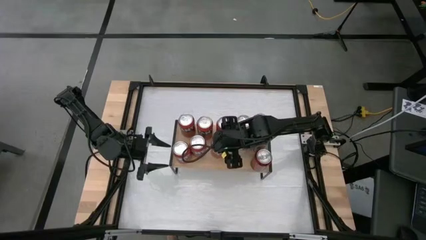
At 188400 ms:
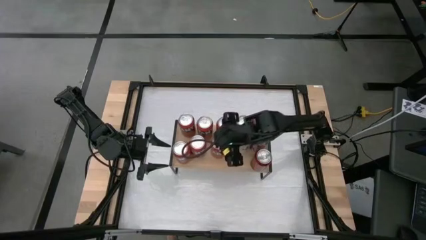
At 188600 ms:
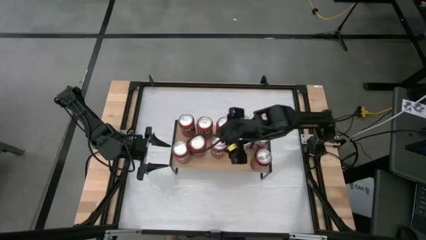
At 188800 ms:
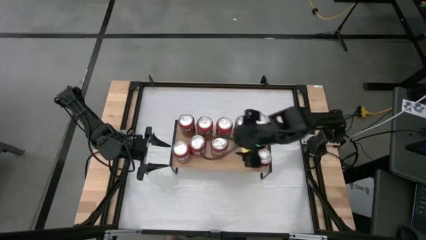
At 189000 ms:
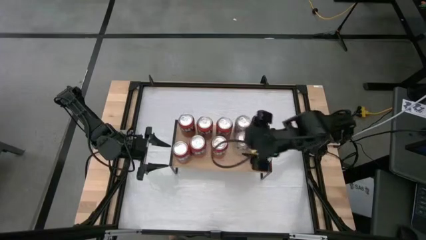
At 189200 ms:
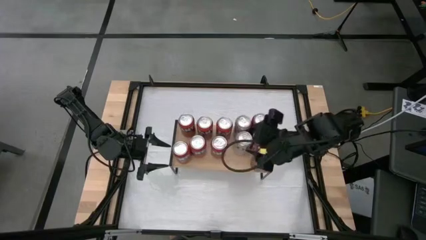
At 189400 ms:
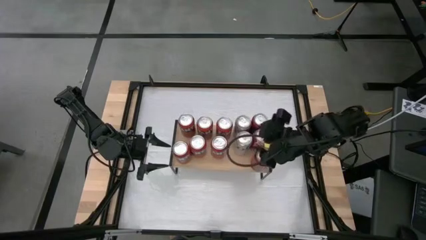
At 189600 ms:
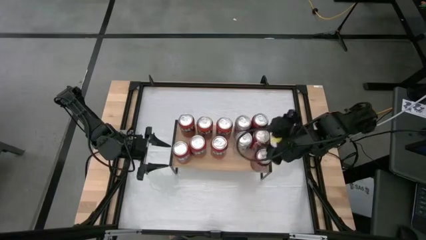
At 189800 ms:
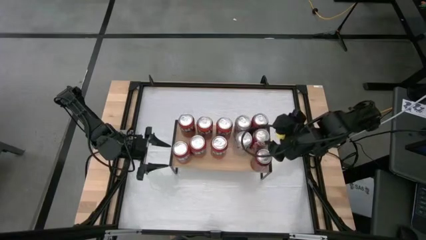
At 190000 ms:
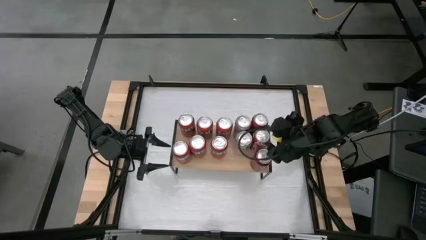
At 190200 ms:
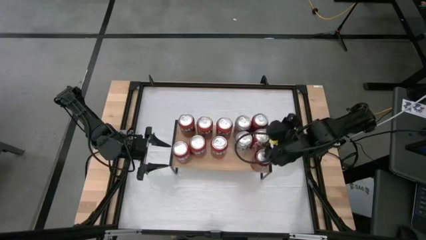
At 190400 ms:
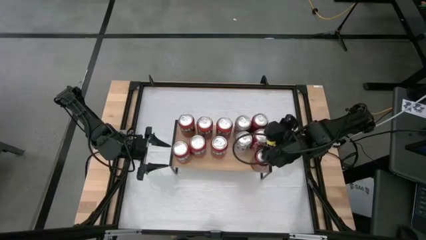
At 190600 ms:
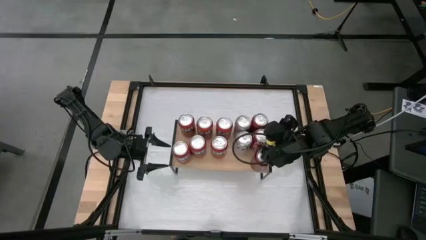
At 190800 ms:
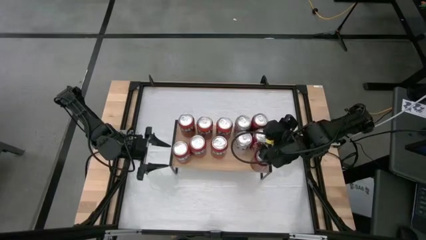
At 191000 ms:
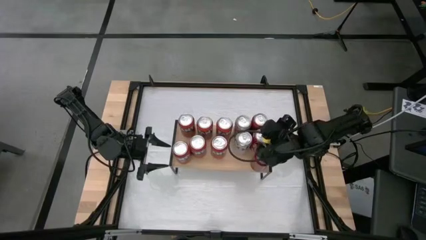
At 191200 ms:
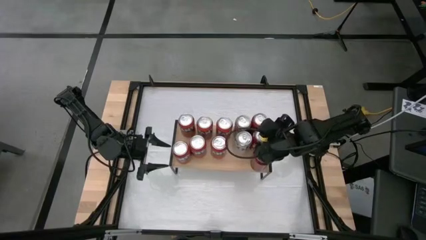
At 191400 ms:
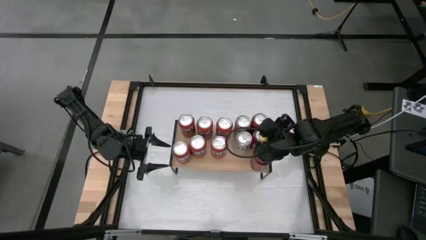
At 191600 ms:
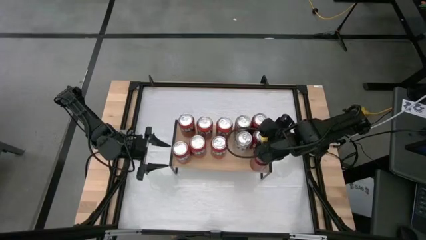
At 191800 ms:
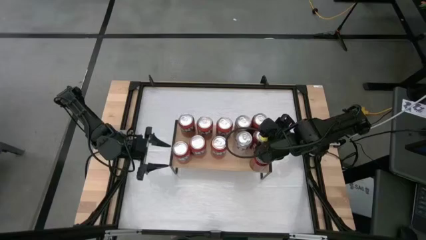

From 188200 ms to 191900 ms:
Task: Place canned beverage on shelf
Adjust the red white soda can on the shelf

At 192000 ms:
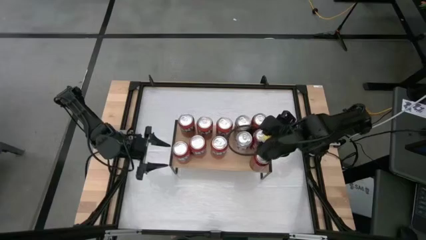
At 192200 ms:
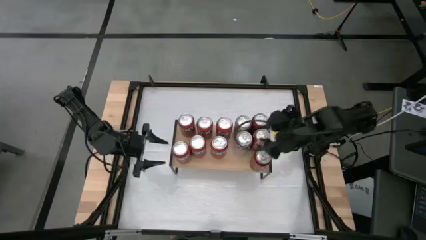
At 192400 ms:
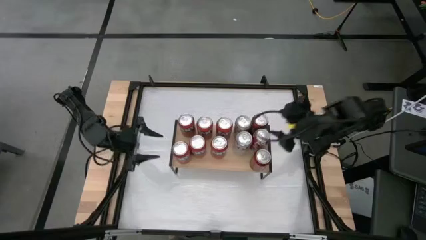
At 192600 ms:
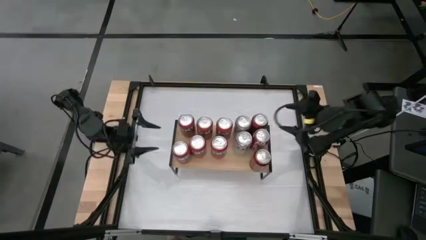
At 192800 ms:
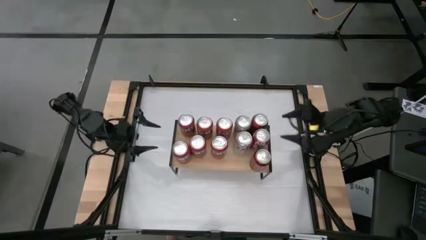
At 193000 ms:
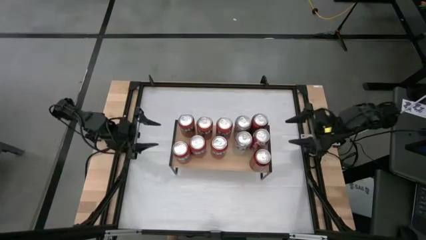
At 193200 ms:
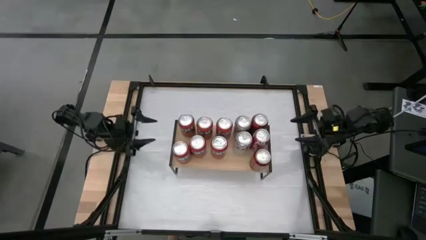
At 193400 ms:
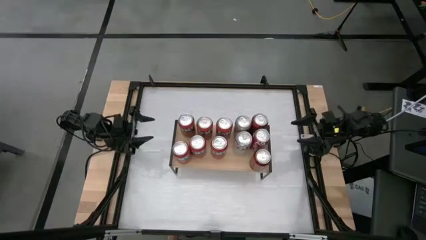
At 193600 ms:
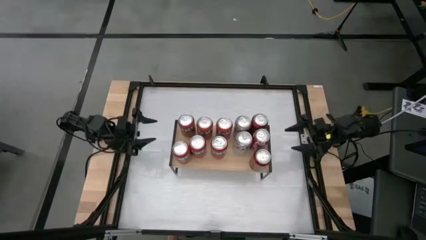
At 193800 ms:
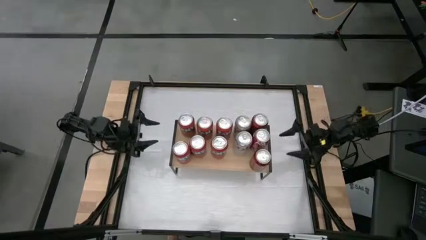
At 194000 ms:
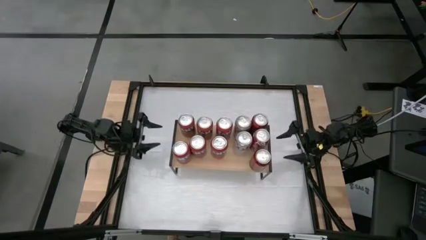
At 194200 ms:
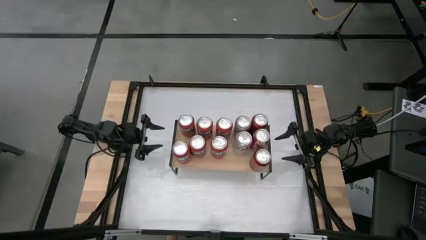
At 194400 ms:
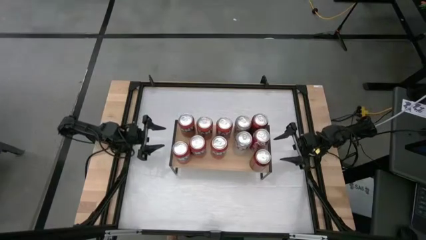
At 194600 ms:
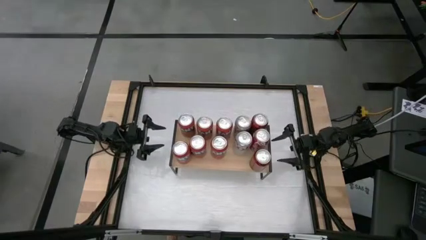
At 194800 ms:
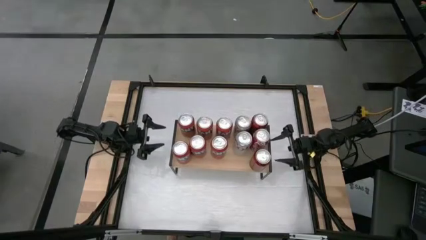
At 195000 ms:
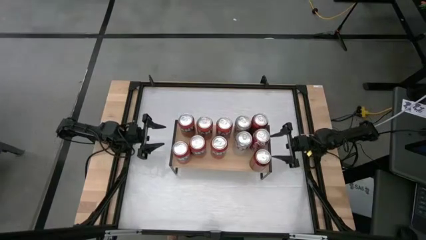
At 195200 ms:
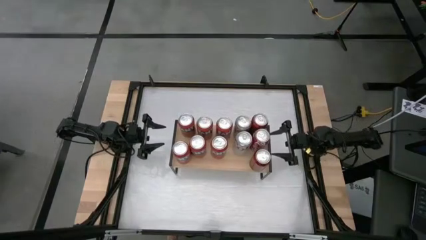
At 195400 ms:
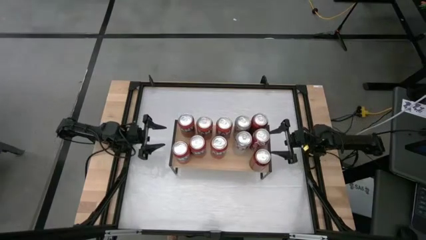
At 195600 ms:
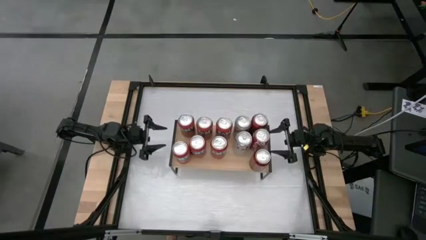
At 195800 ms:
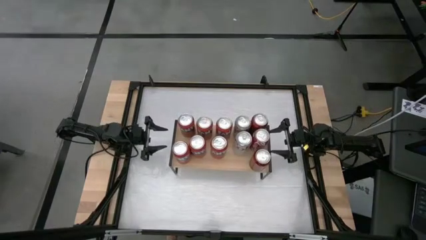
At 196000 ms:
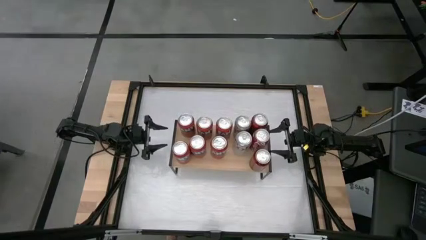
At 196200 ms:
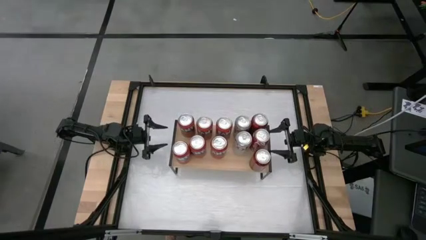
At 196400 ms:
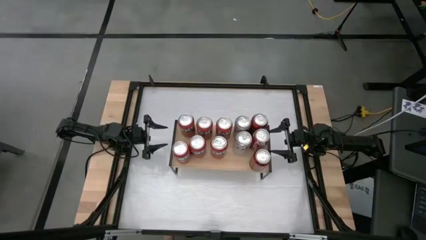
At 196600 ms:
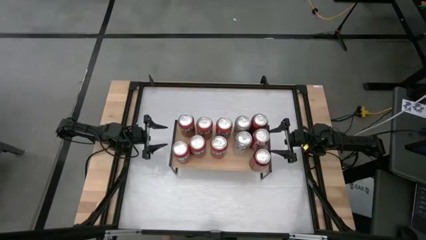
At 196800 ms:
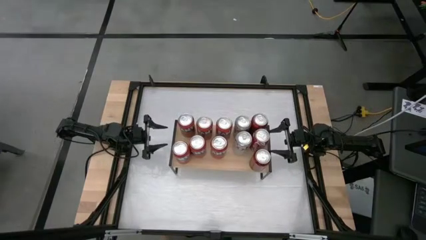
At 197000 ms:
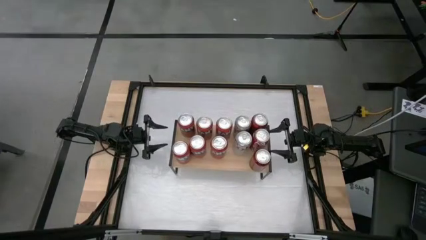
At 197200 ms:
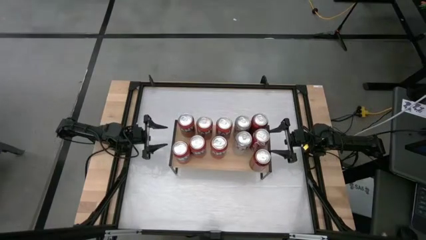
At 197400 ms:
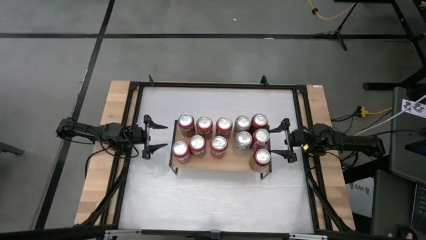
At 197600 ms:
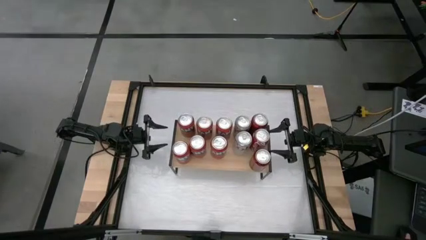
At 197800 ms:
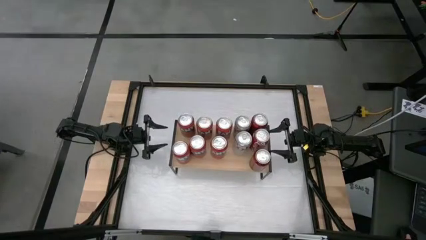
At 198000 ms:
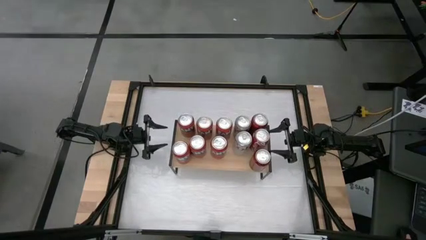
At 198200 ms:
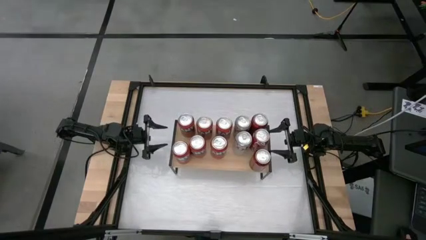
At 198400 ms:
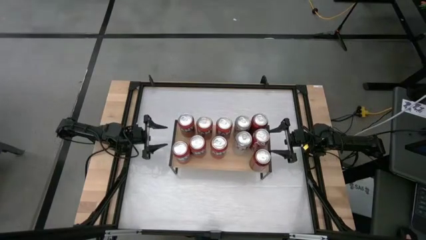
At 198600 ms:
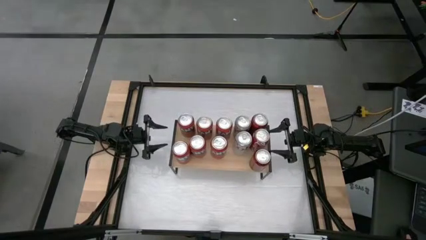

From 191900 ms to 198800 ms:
Return to Home Position

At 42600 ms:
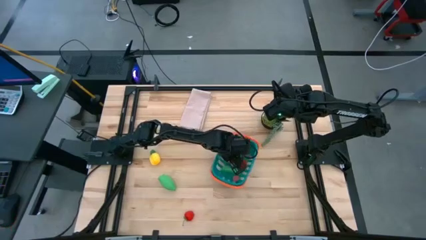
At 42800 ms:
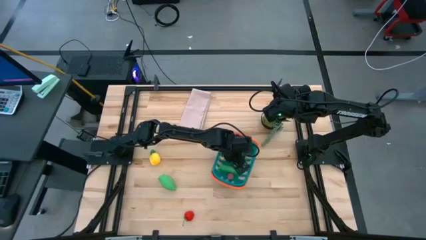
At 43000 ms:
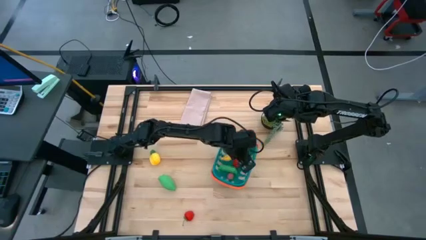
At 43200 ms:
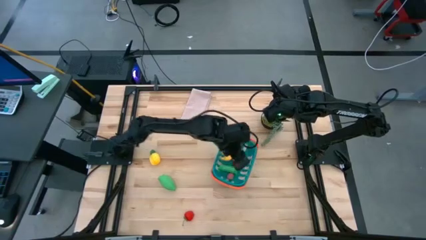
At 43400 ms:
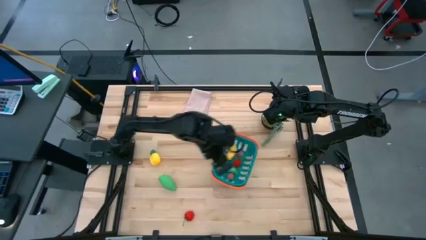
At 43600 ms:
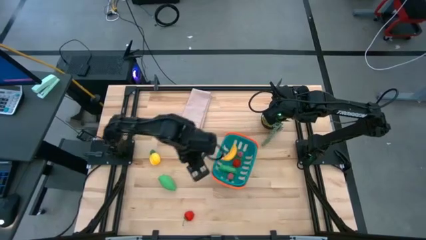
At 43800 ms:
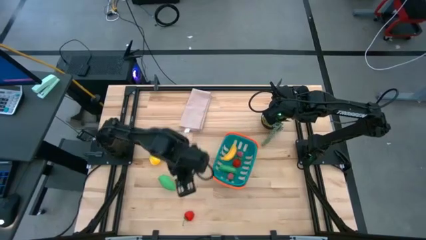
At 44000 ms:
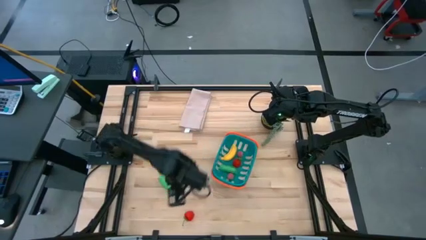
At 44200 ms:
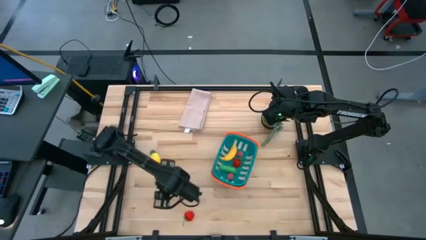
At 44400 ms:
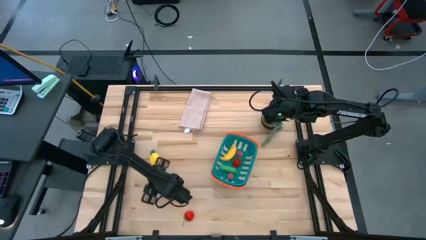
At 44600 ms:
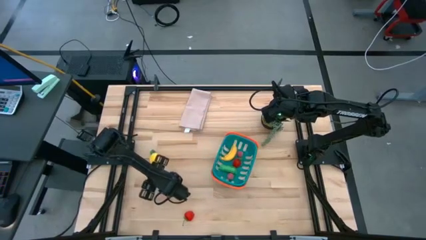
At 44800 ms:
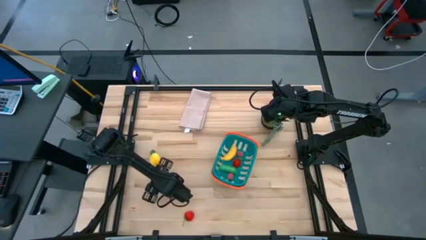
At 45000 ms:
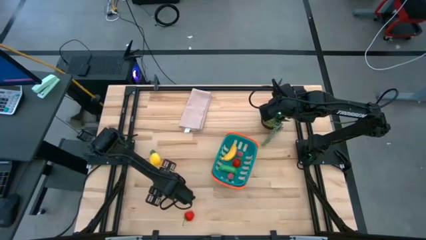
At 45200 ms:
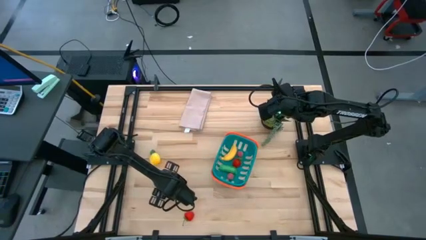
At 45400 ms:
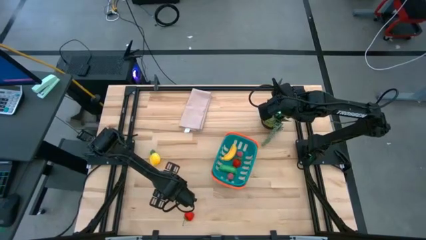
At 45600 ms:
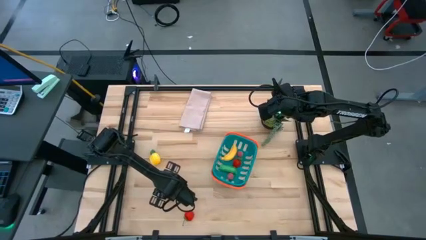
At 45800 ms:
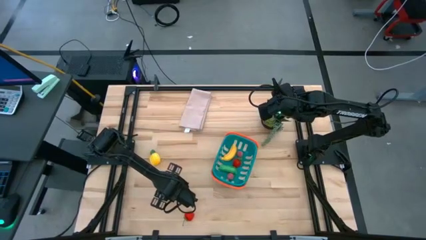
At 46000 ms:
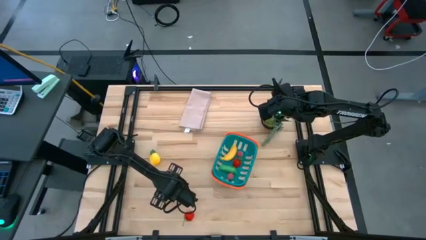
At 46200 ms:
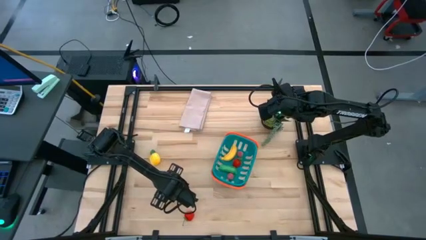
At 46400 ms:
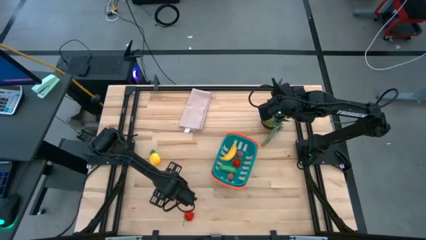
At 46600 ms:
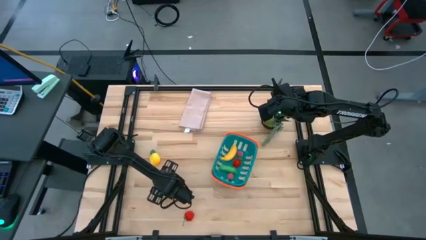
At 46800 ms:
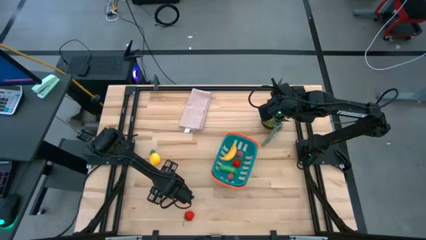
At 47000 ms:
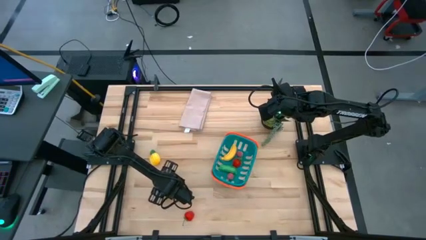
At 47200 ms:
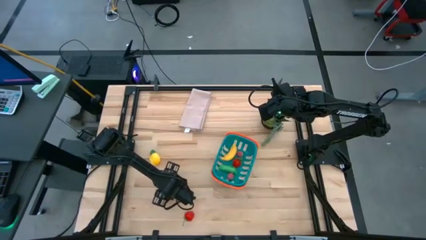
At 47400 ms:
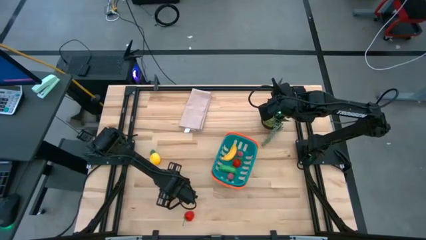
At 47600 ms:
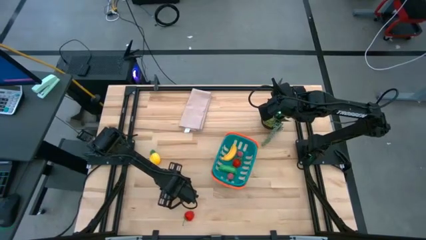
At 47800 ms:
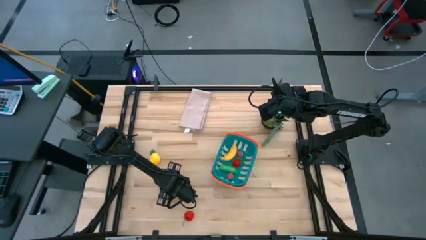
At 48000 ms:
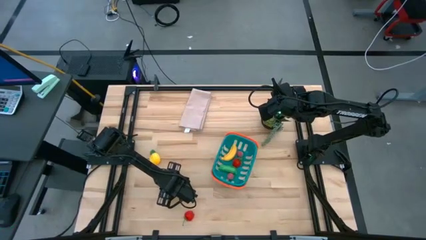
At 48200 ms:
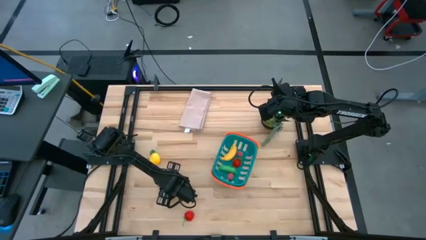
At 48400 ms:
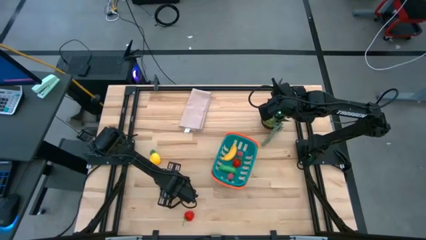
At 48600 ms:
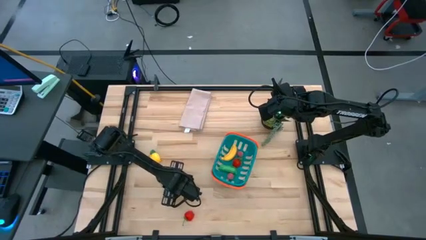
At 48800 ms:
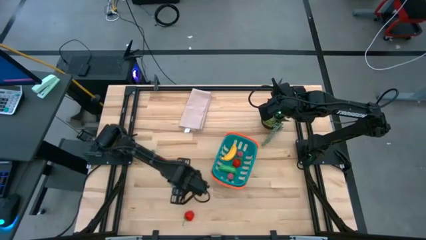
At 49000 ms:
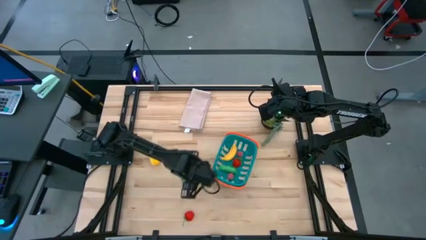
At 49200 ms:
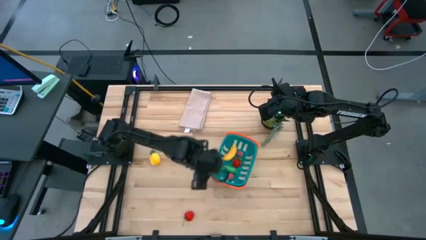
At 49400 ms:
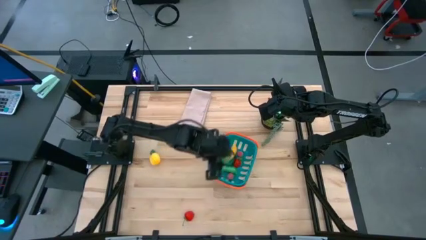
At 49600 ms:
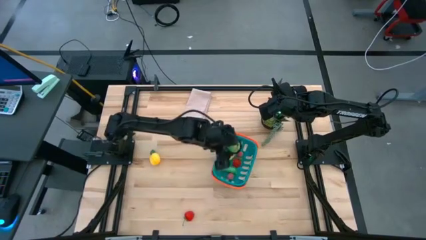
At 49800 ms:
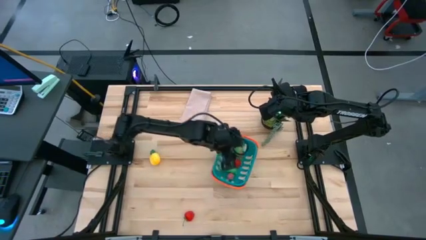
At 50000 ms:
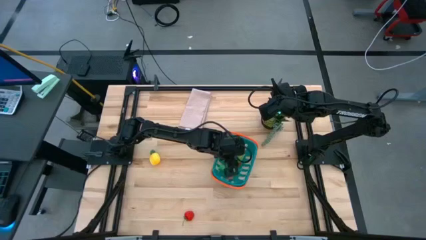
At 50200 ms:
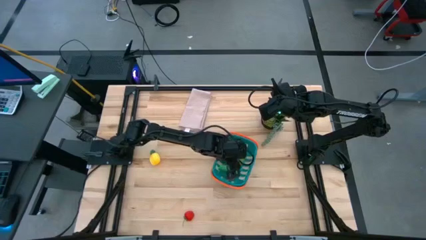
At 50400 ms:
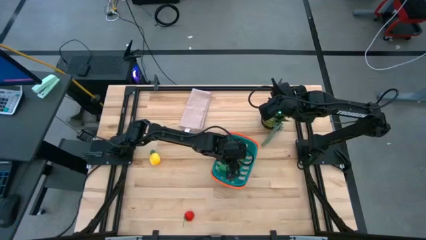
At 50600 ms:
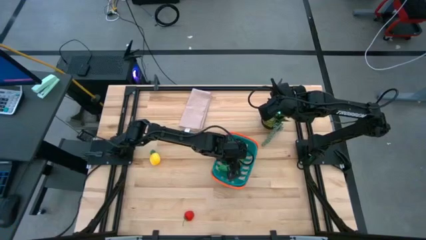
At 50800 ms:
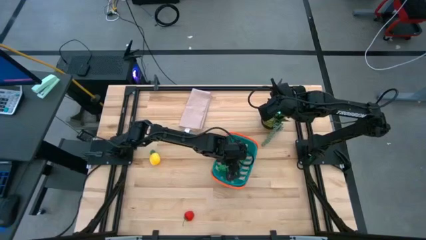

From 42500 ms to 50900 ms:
Task: Pick and placing Produce into tupperware
Put the green corn into the blue basket
